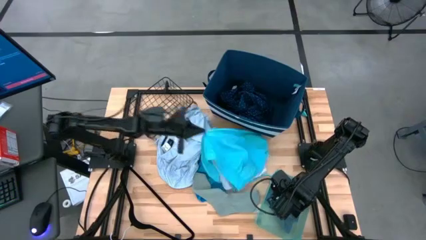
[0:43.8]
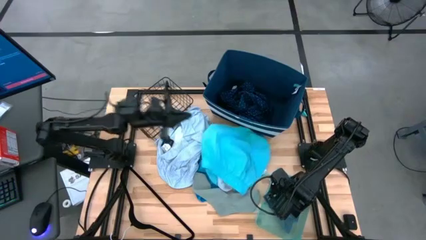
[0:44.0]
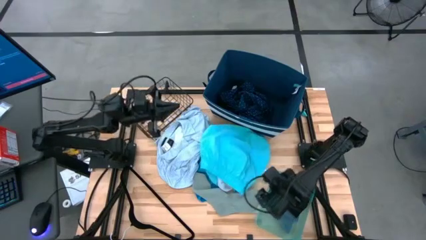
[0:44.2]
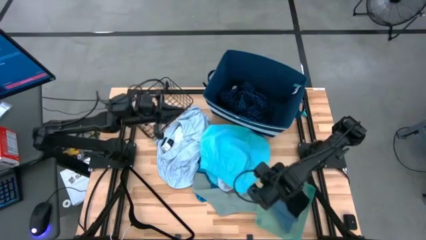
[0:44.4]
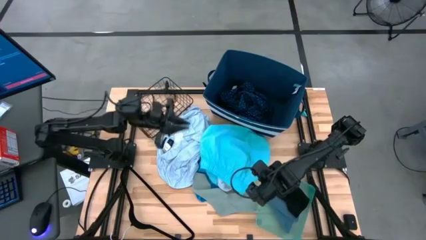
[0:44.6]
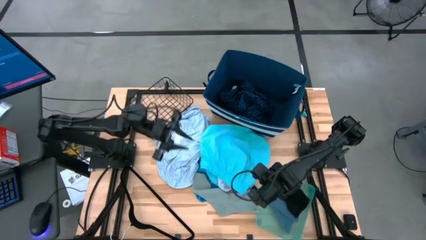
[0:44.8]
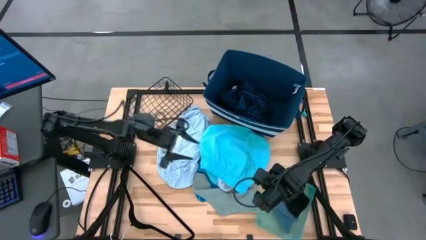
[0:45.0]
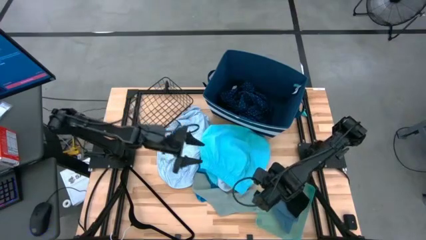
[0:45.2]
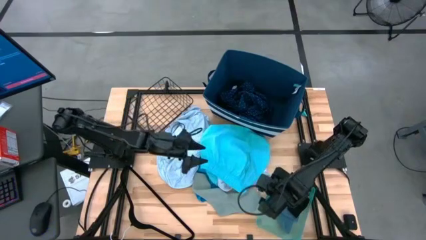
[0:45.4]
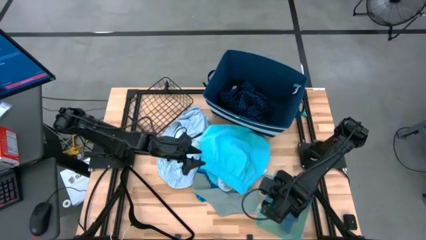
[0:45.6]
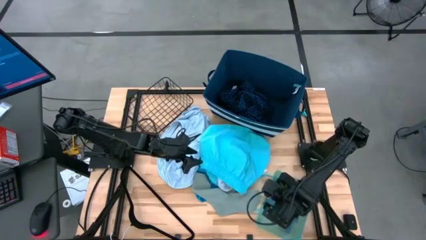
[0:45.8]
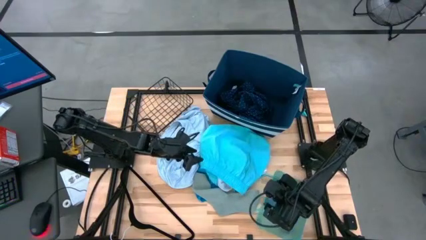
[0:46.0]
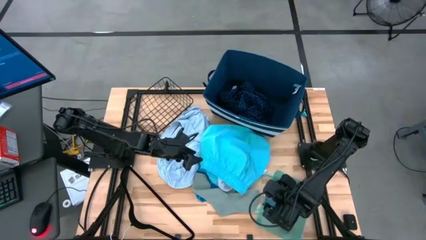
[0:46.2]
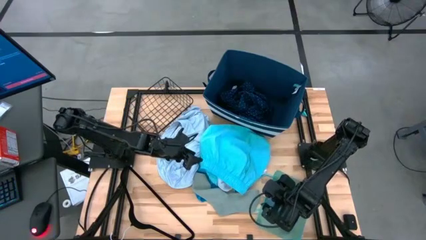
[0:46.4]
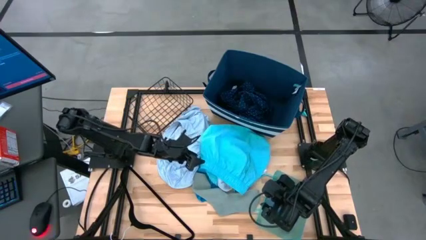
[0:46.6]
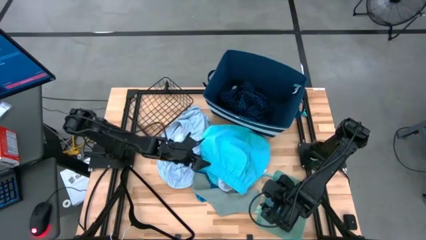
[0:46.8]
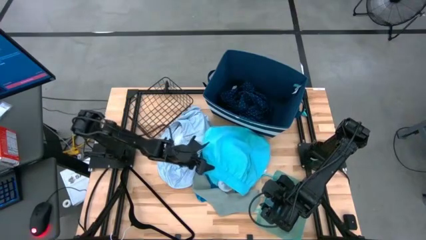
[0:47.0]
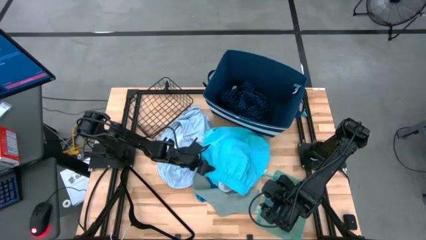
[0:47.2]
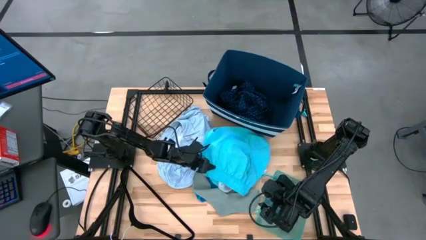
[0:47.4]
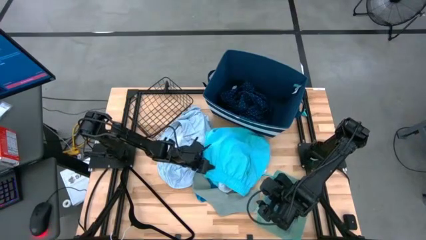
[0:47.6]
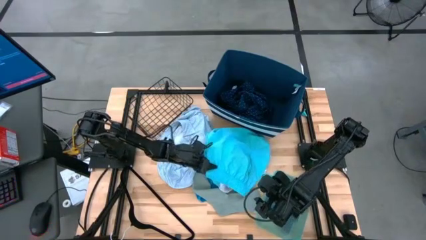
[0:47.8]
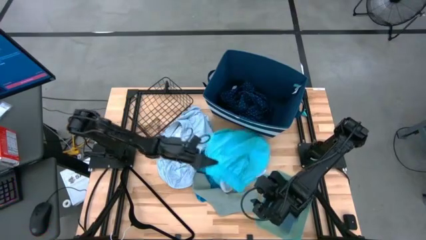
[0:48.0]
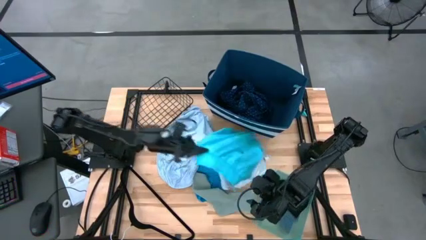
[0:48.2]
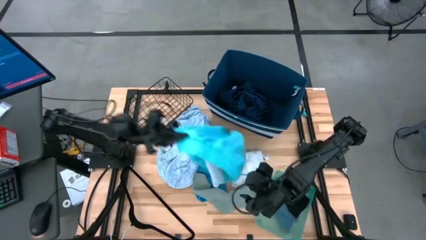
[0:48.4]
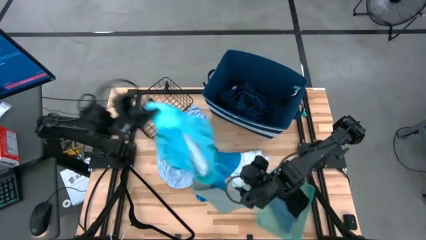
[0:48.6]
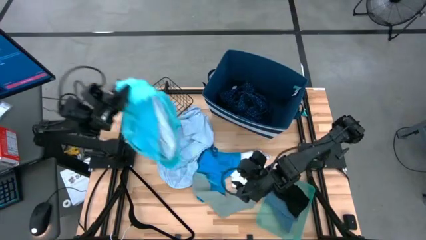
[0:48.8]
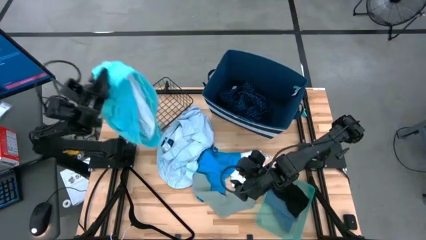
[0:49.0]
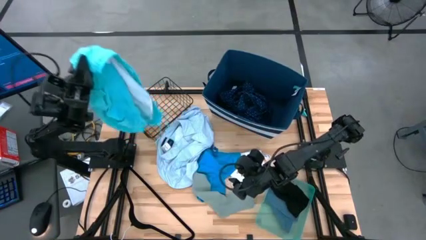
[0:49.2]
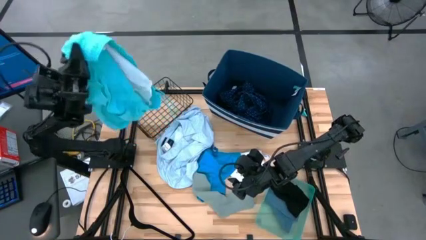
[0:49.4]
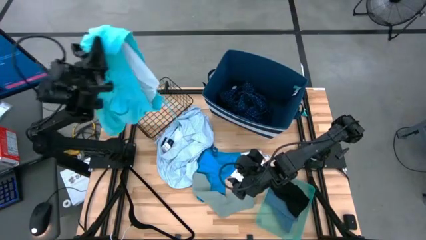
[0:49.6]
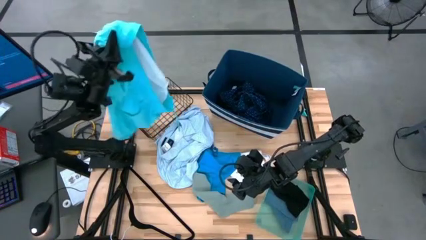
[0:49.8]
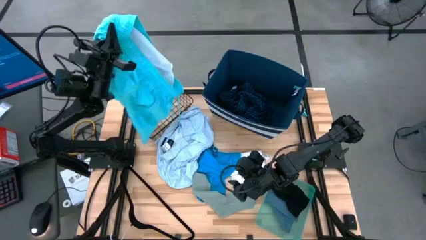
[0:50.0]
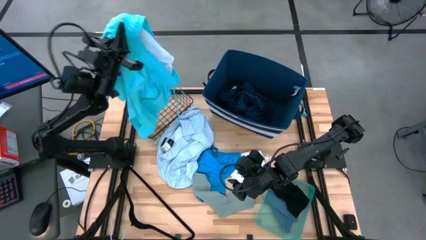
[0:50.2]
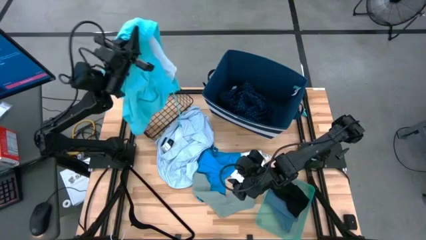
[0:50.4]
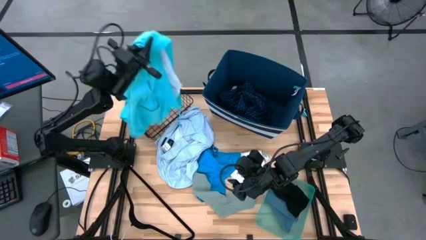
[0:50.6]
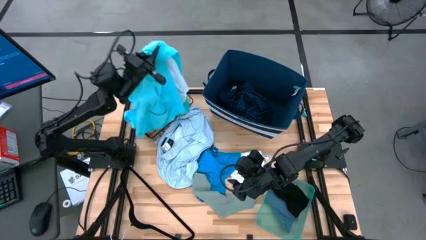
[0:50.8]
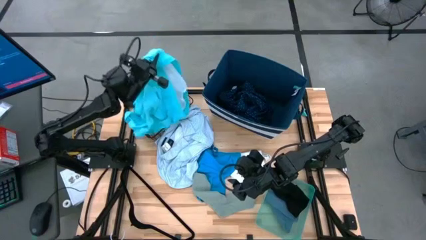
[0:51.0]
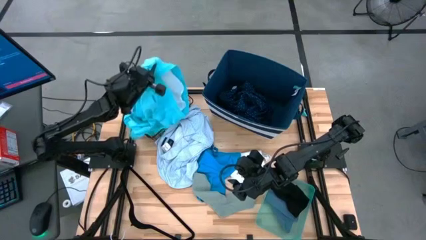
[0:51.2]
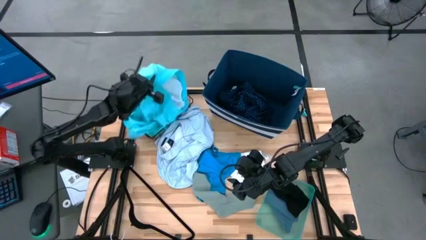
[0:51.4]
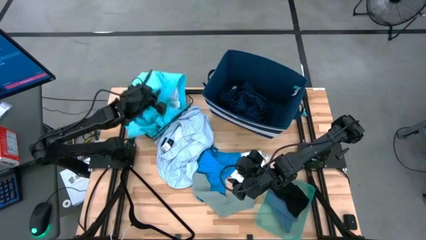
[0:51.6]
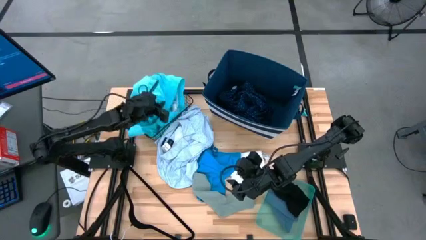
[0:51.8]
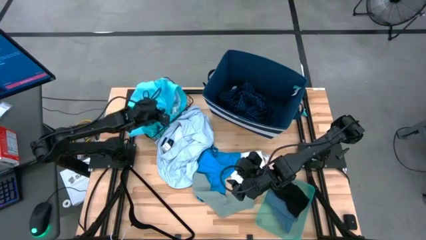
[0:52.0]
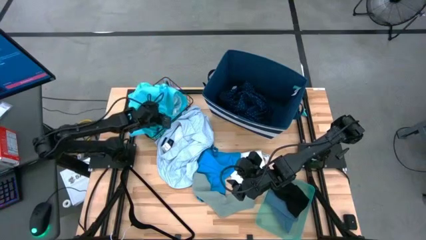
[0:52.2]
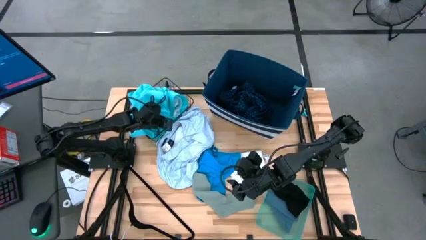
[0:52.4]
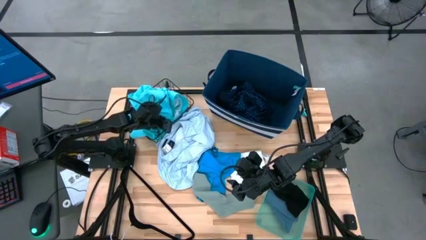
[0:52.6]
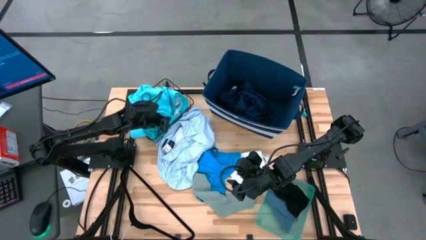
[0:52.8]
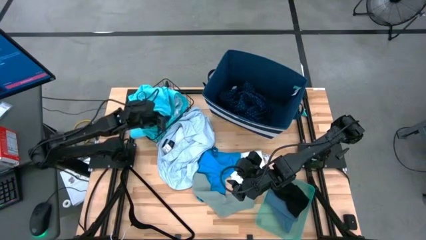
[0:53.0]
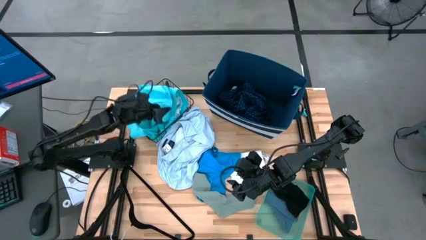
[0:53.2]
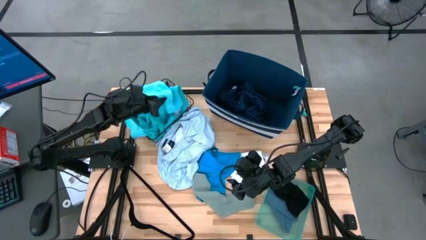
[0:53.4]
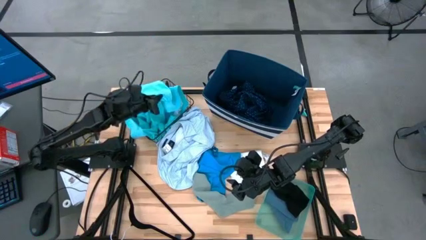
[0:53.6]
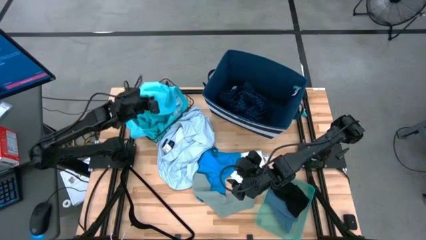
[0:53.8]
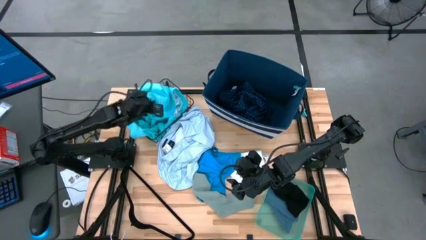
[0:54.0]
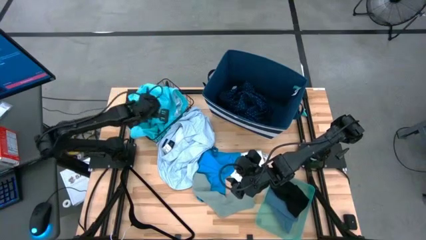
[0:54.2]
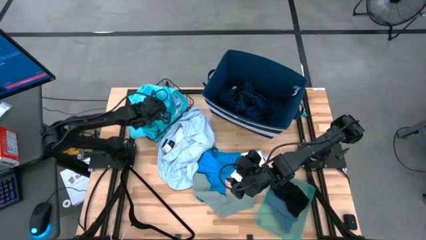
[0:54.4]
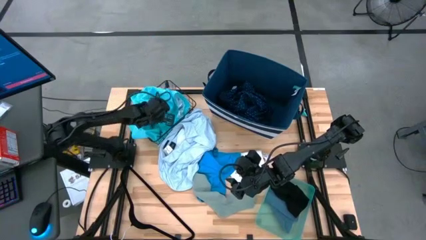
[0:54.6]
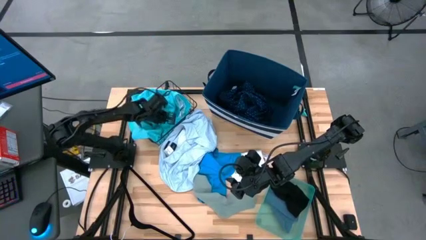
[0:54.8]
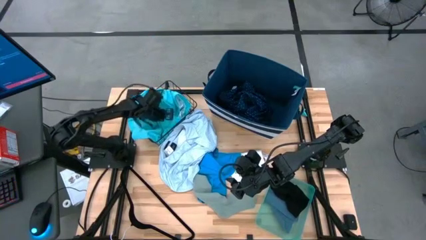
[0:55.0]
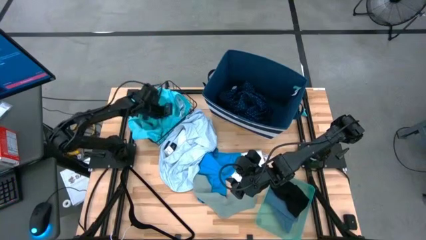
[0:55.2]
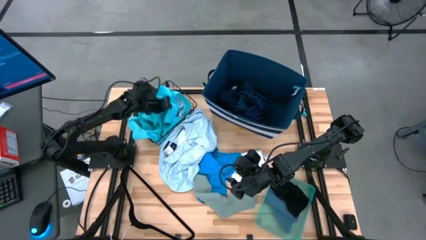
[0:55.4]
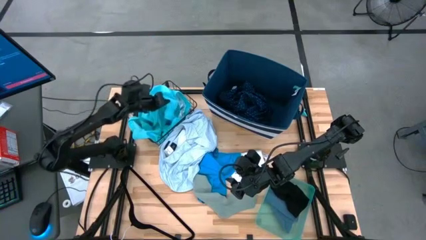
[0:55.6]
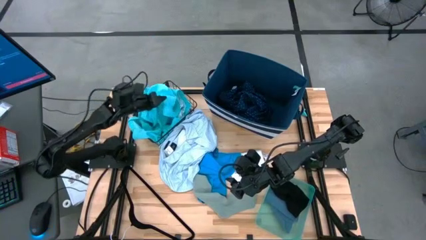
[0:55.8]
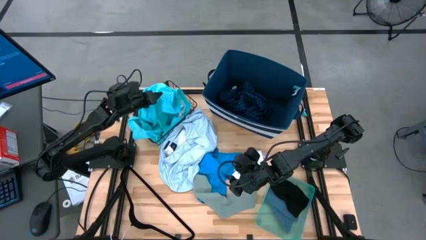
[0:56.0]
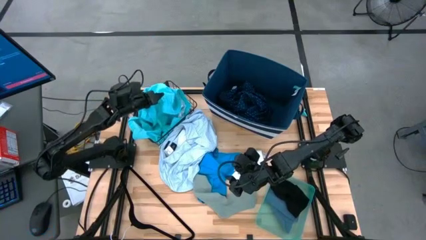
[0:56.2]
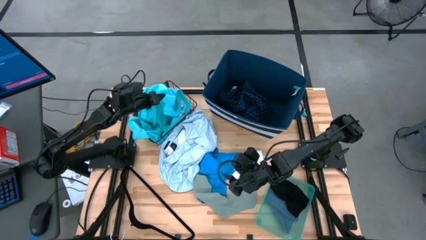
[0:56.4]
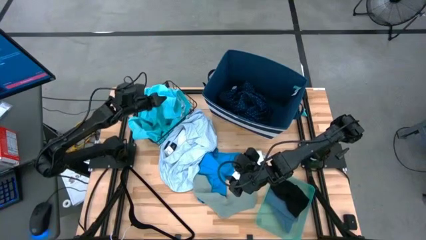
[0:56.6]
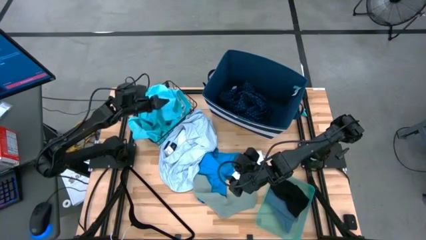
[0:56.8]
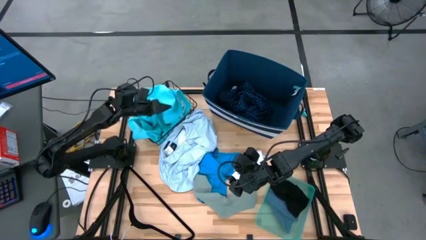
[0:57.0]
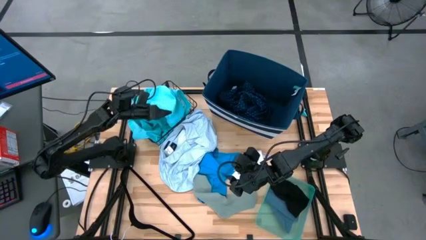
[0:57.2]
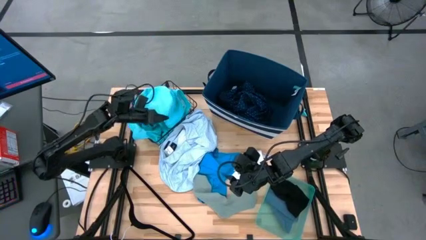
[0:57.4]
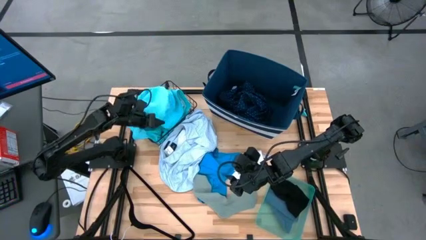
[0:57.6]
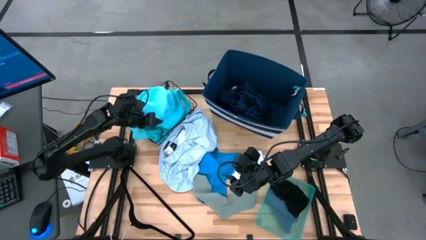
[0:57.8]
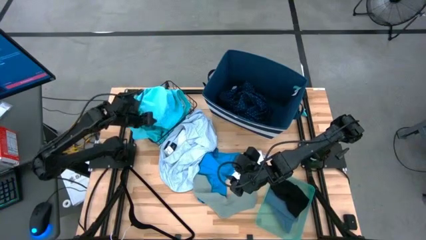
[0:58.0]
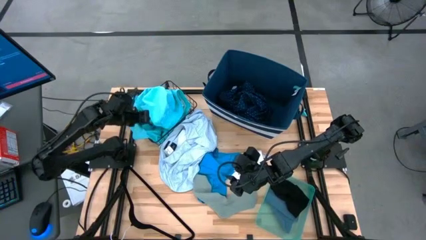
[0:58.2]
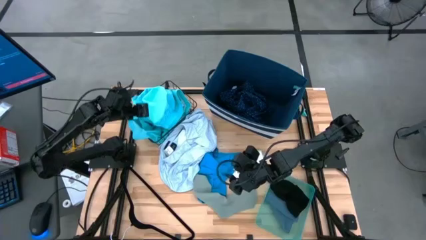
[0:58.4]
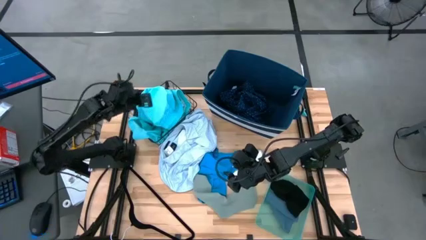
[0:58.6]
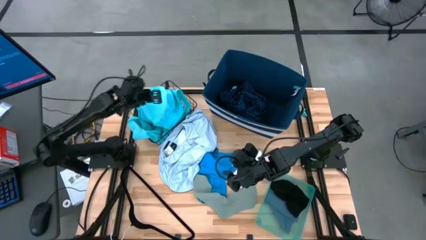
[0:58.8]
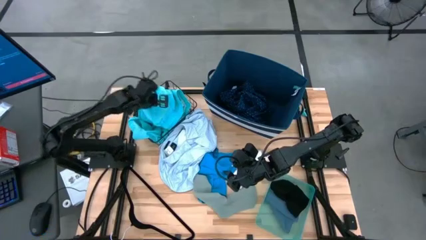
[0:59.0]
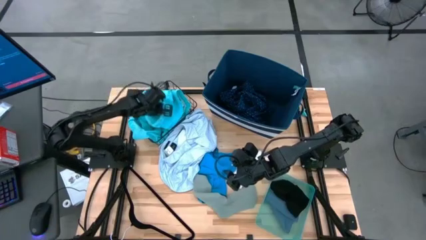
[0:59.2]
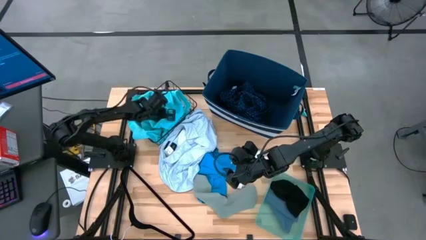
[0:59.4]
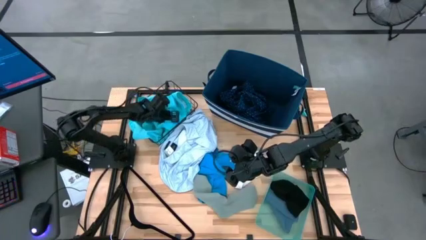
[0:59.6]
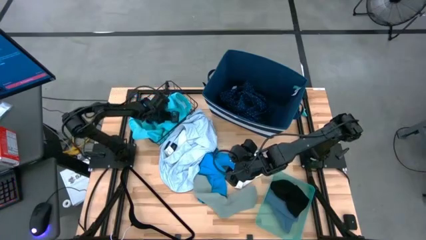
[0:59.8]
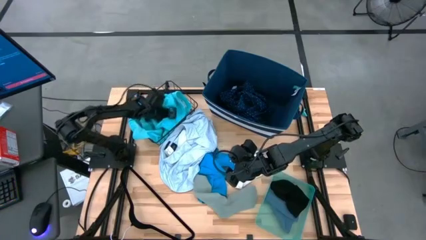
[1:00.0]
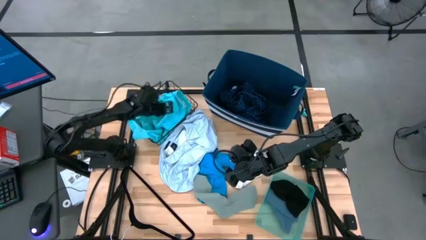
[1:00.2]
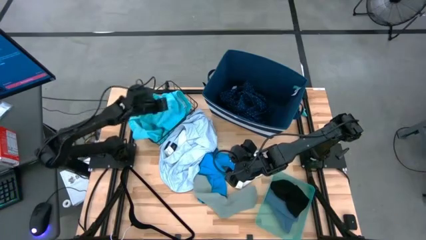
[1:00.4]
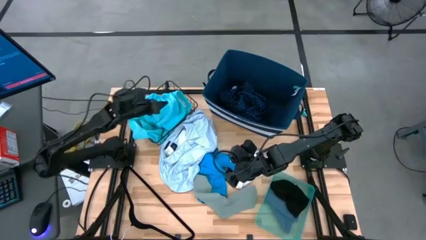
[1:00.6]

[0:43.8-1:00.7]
Task: Pick & Place Cloths
Put the light blue shorts into the black wire basket
